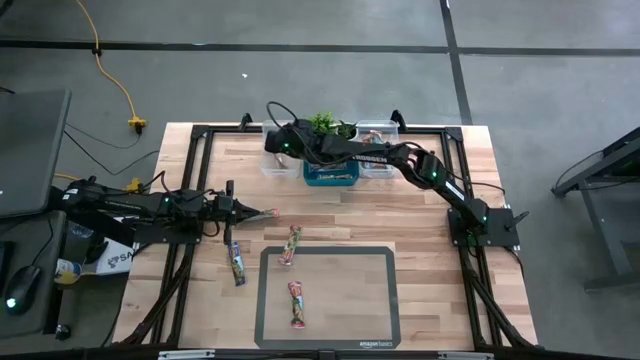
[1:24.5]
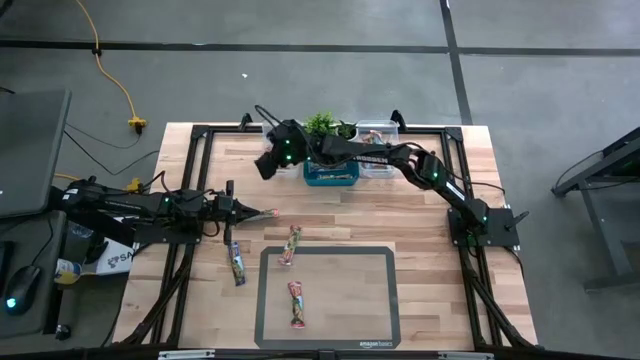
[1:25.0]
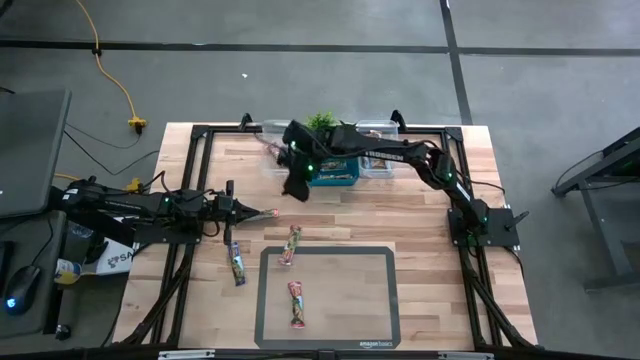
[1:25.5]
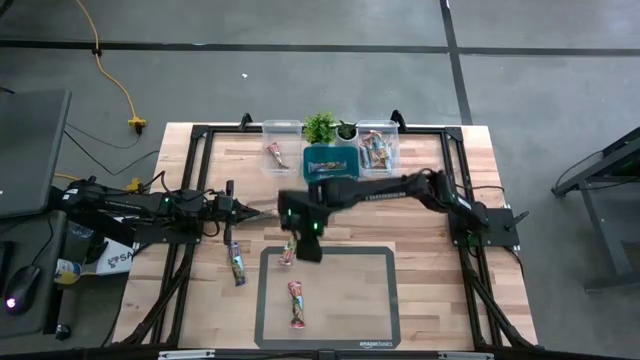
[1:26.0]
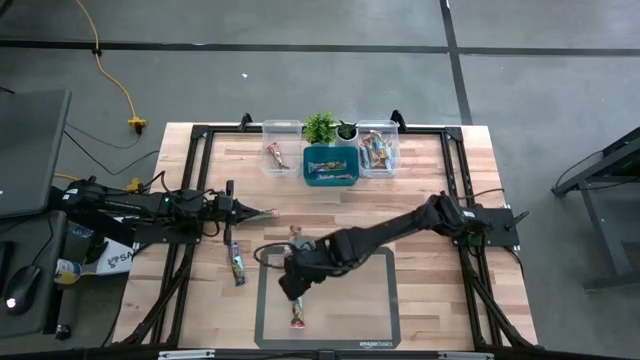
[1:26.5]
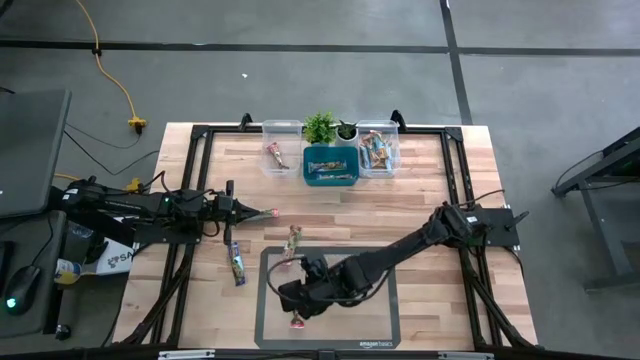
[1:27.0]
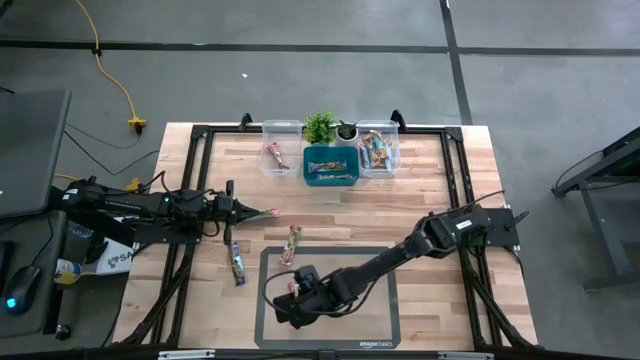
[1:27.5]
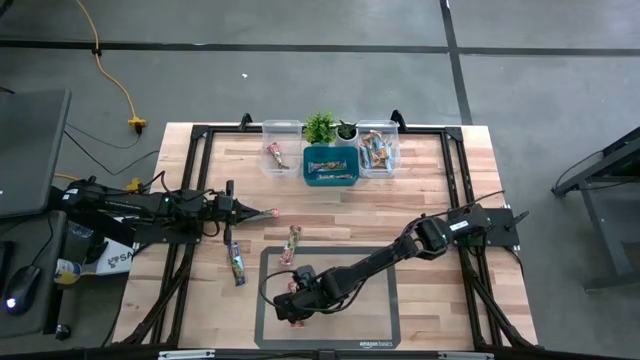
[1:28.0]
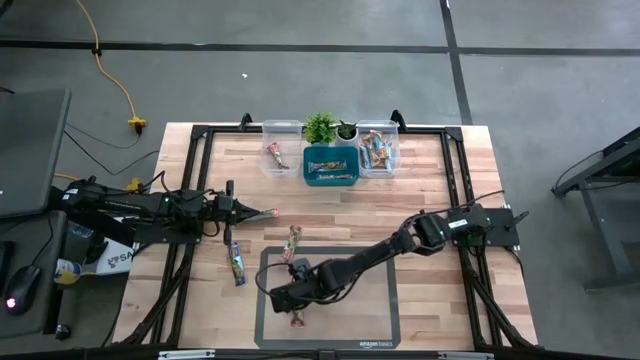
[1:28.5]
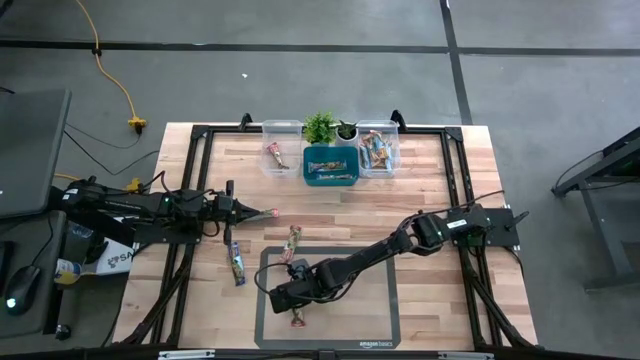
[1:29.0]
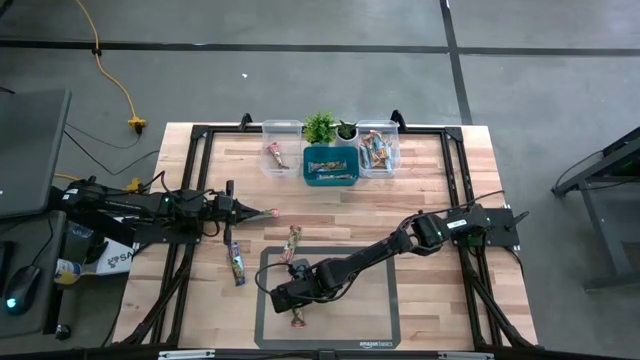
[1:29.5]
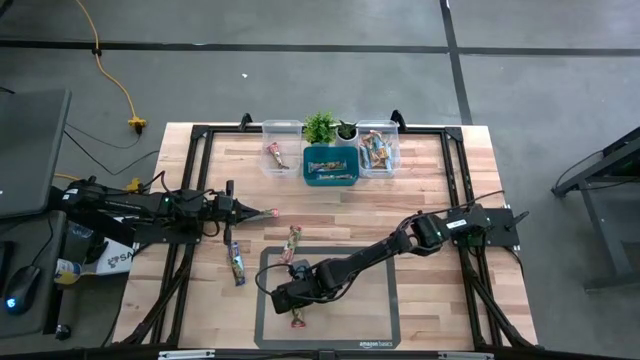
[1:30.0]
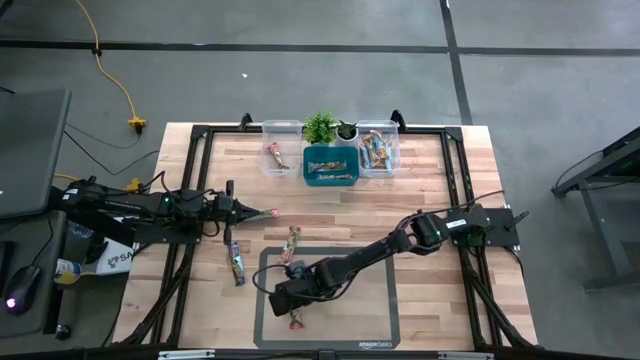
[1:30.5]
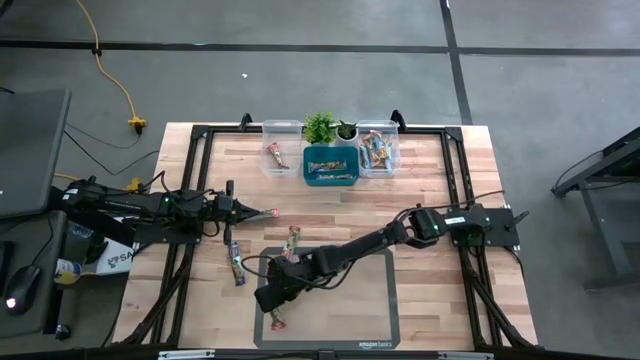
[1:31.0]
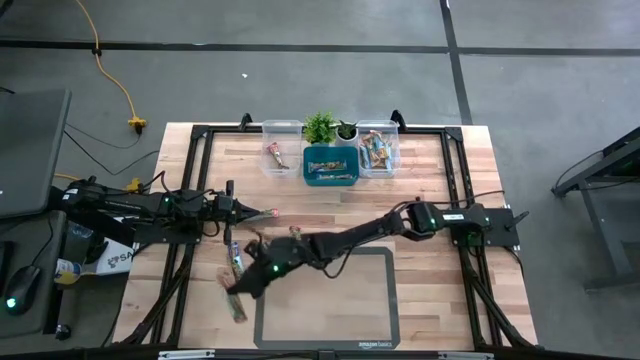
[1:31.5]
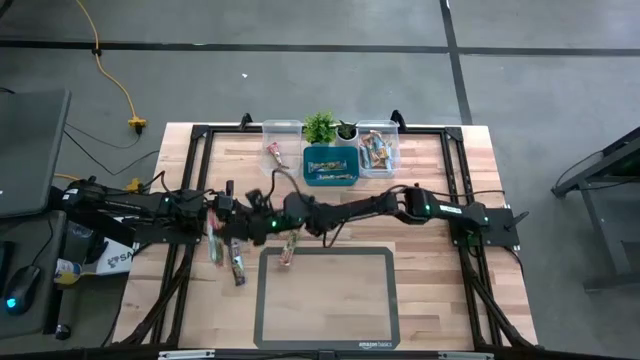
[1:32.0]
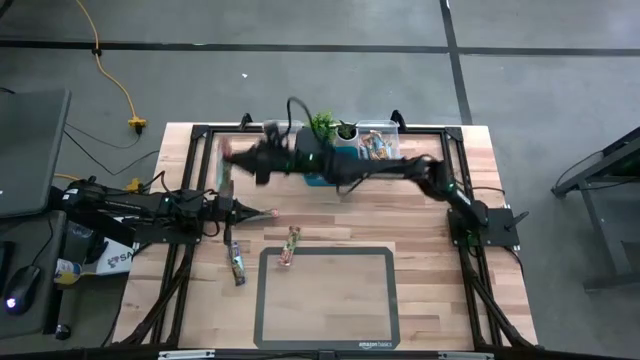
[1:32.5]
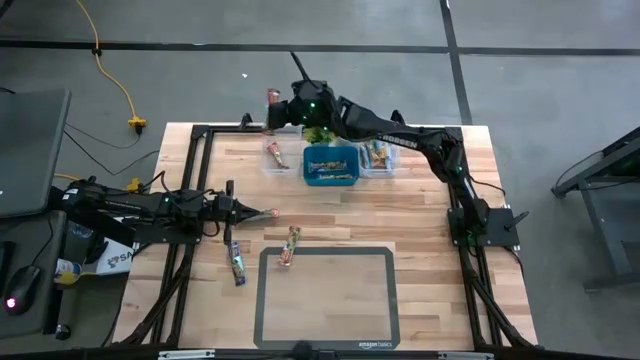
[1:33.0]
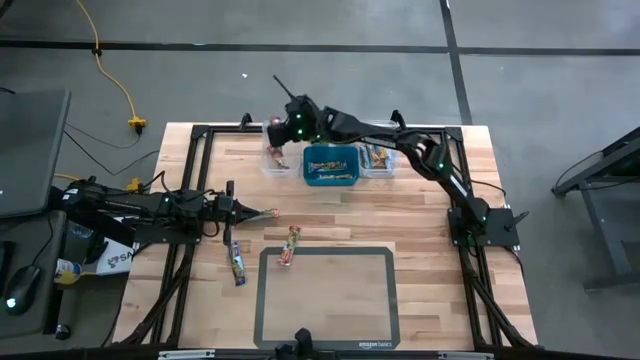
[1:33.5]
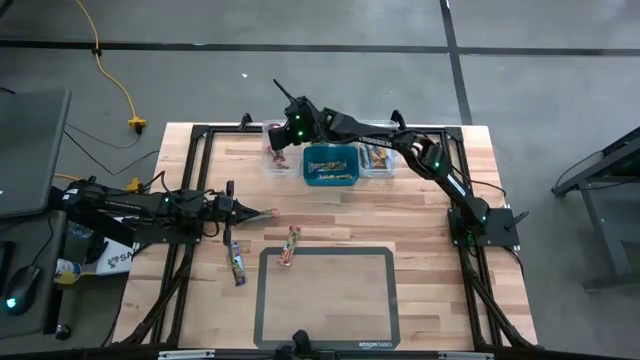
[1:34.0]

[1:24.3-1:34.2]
Task: Pick and place Granola Bars by type
Put the red granola bar into the left transparent bin

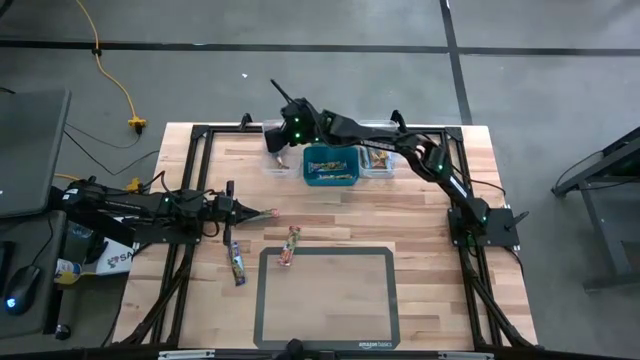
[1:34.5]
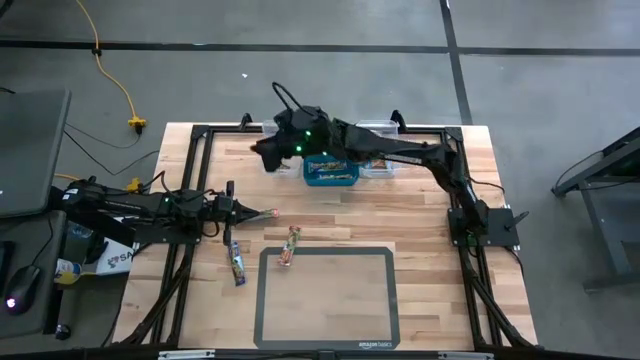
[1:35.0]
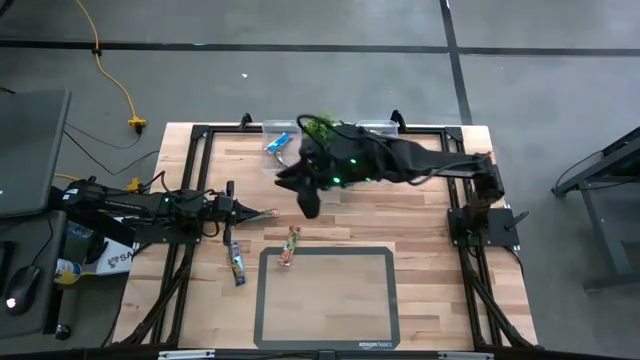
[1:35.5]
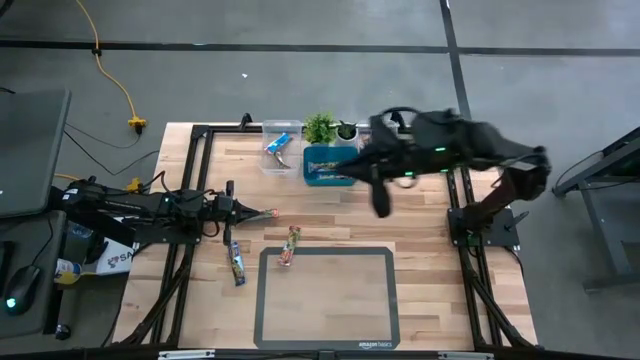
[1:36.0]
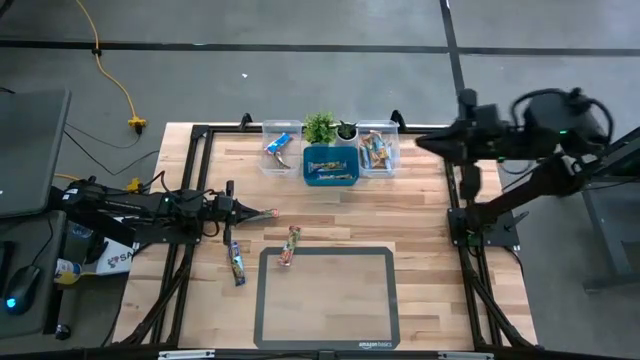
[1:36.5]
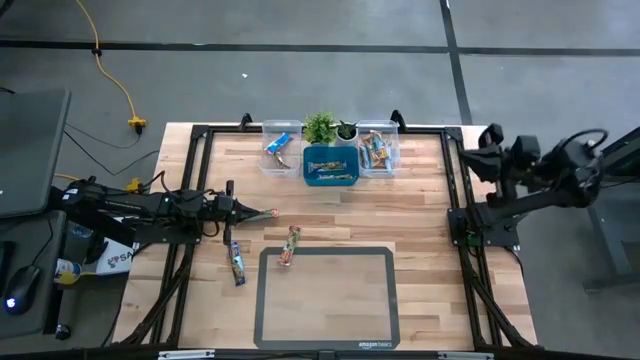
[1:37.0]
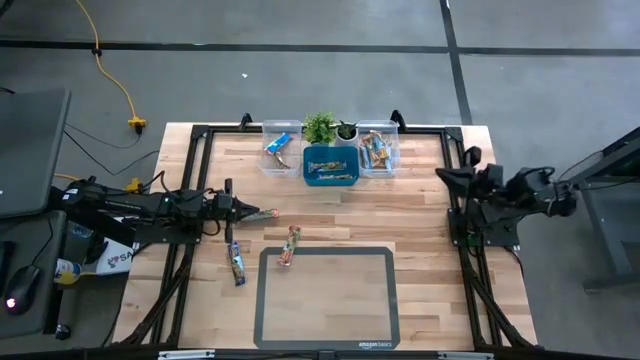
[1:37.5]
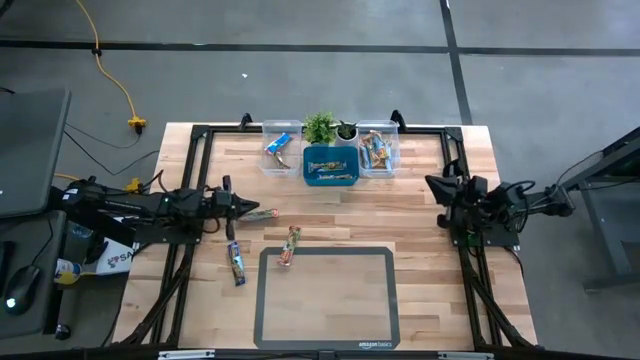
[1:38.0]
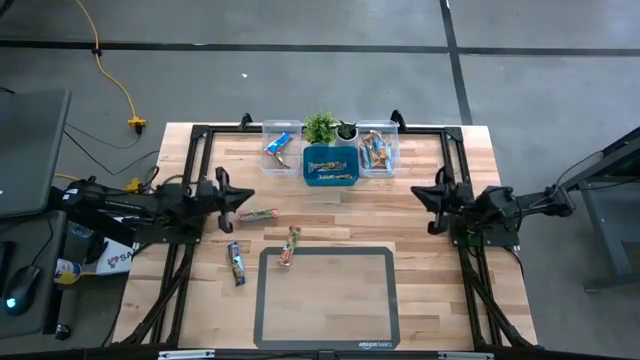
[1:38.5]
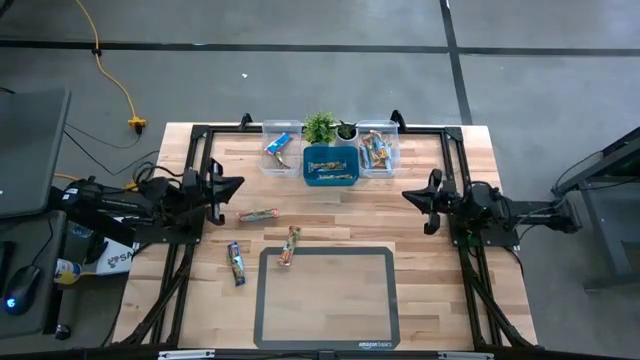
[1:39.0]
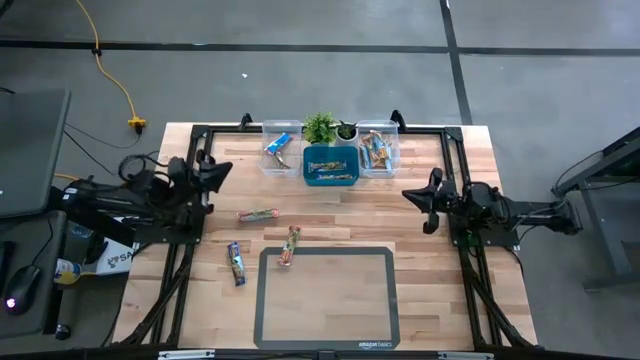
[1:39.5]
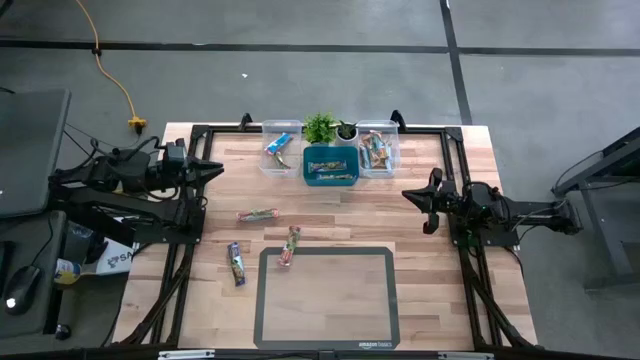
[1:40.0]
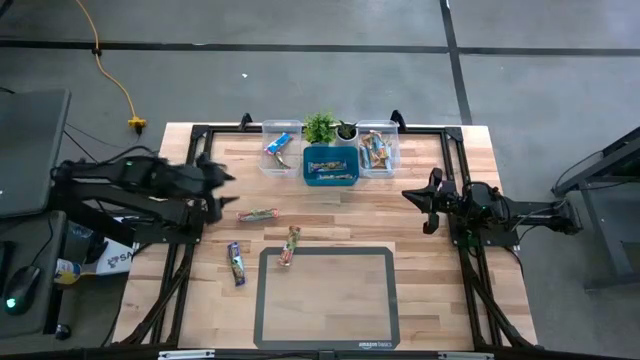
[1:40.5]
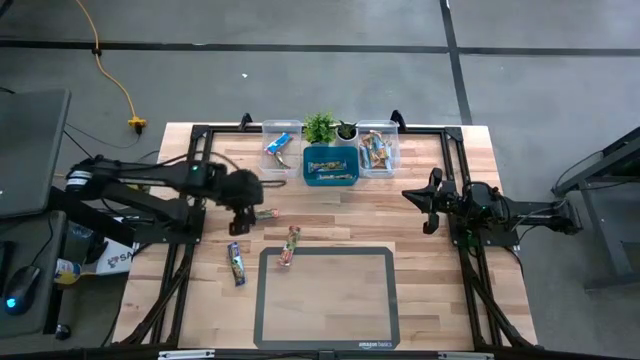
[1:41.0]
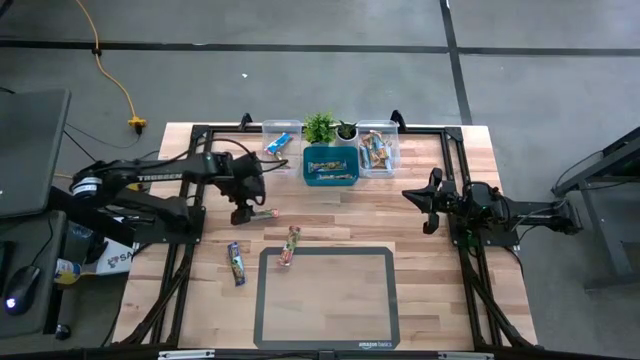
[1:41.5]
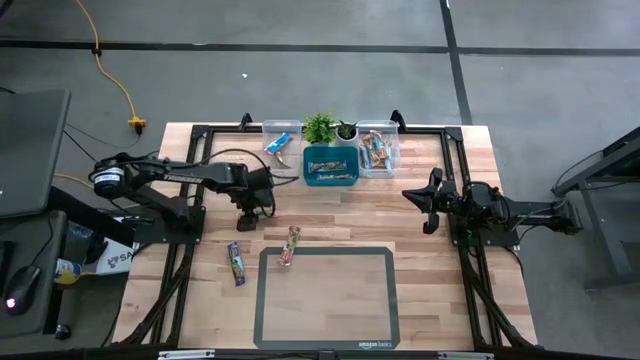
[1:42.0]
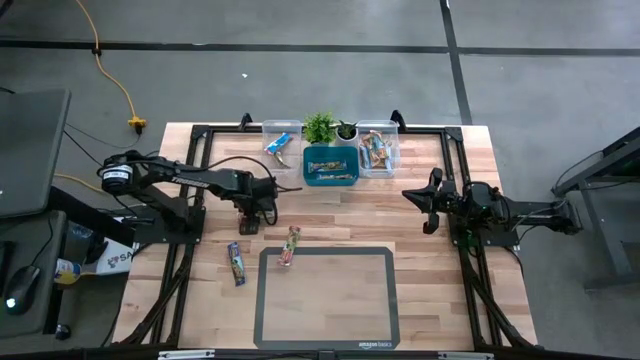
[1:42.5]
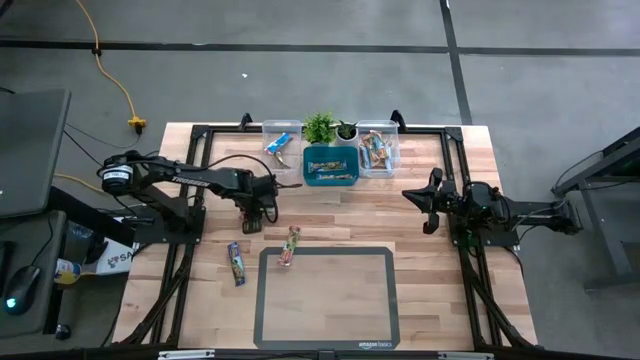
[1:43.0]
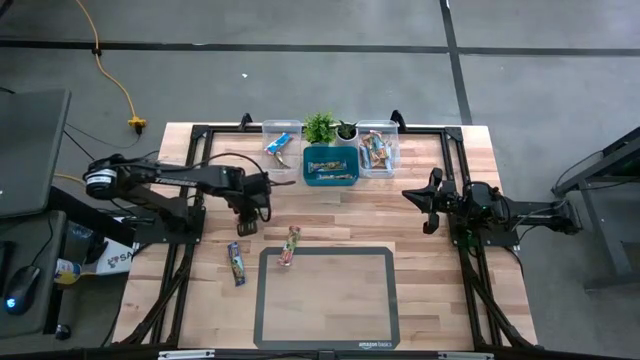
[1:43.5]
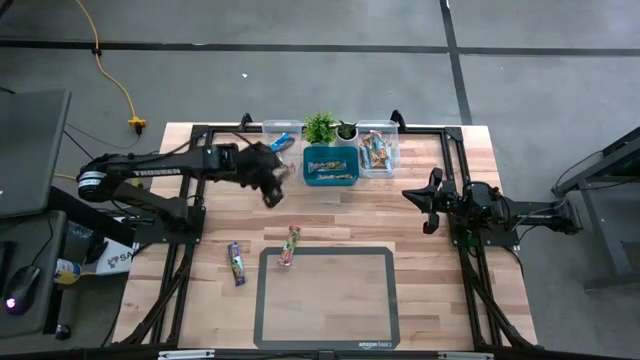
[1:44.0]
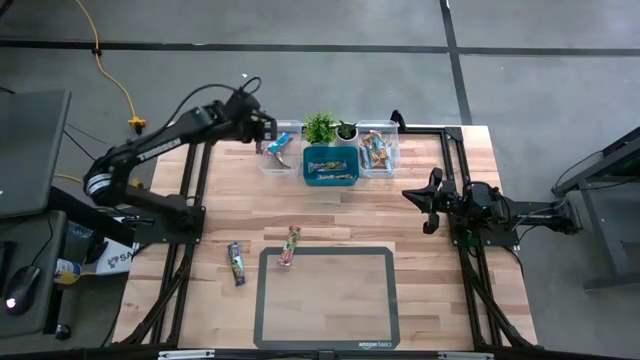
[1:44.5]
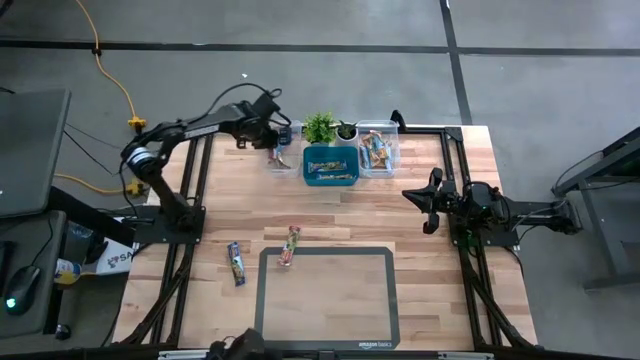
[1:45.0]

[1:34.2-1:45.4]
Put the red granola bar into the left transparent bin
